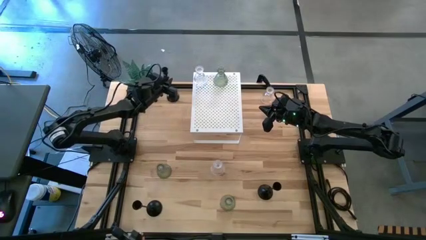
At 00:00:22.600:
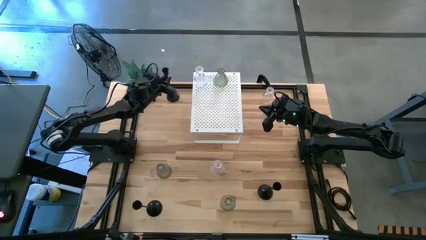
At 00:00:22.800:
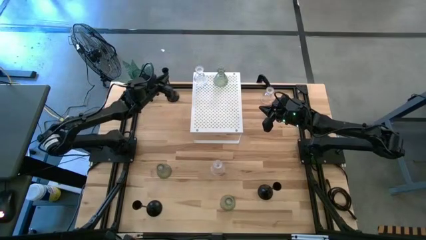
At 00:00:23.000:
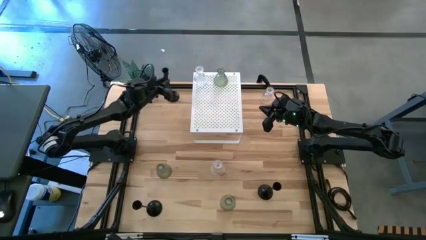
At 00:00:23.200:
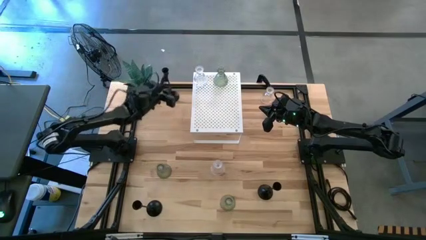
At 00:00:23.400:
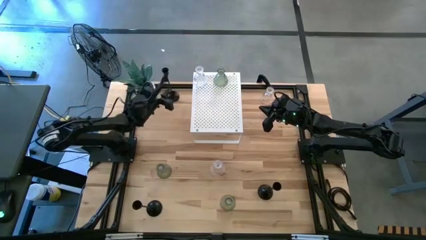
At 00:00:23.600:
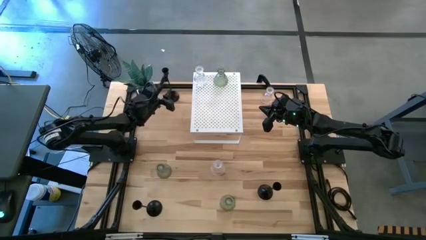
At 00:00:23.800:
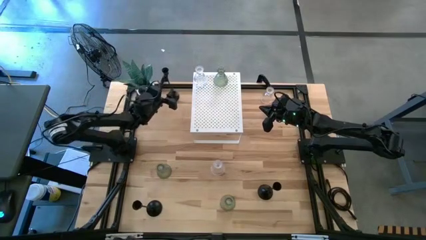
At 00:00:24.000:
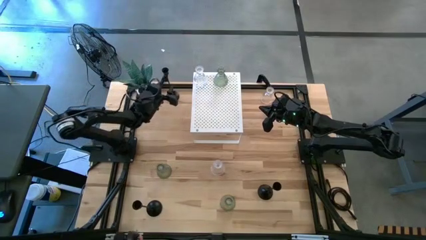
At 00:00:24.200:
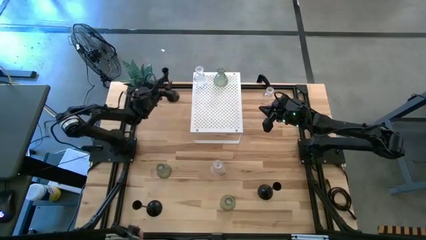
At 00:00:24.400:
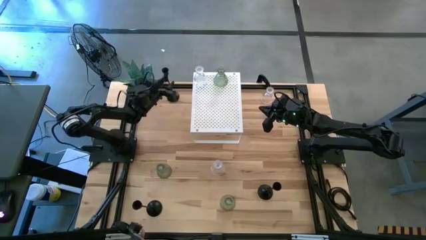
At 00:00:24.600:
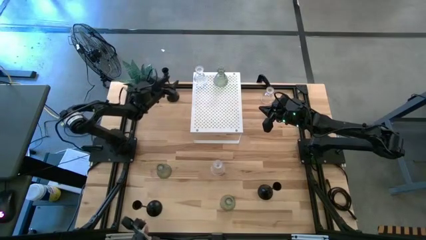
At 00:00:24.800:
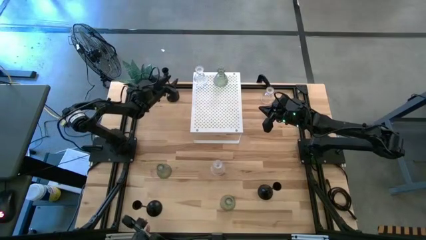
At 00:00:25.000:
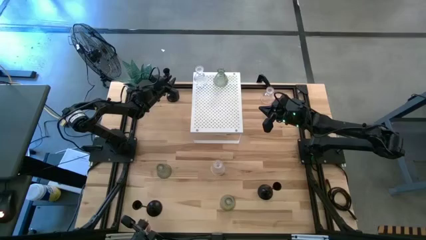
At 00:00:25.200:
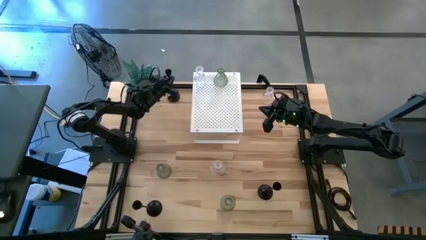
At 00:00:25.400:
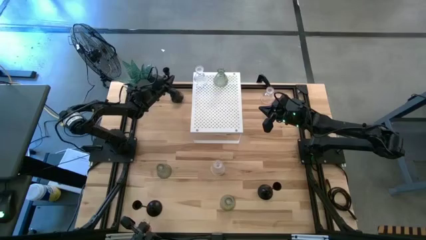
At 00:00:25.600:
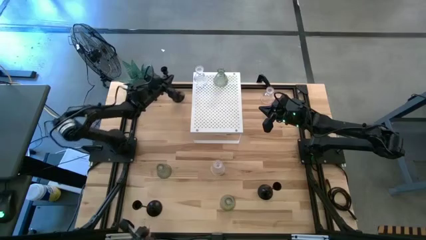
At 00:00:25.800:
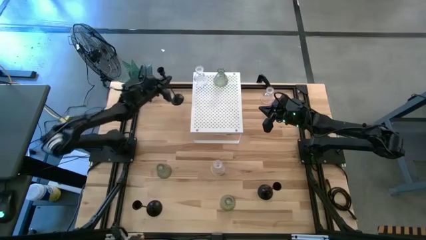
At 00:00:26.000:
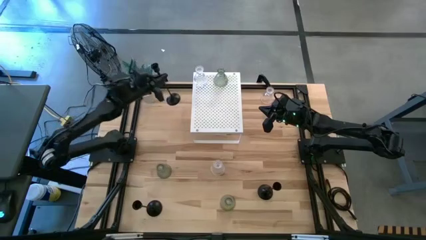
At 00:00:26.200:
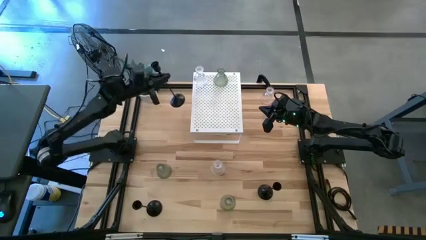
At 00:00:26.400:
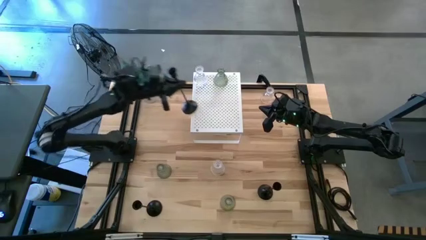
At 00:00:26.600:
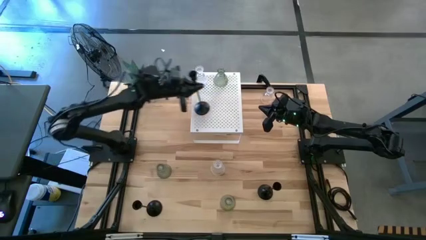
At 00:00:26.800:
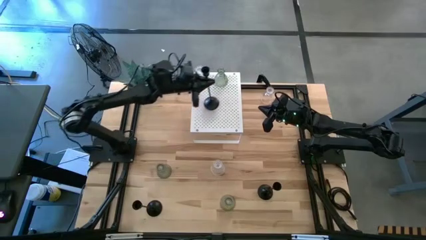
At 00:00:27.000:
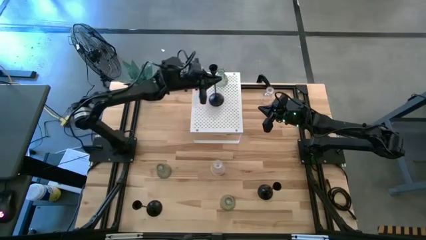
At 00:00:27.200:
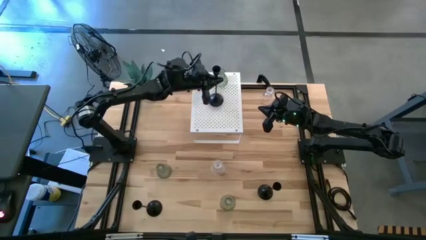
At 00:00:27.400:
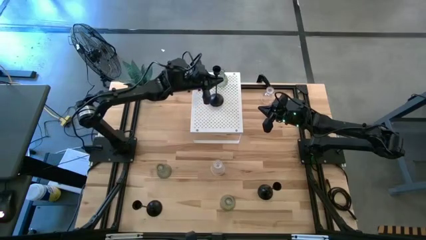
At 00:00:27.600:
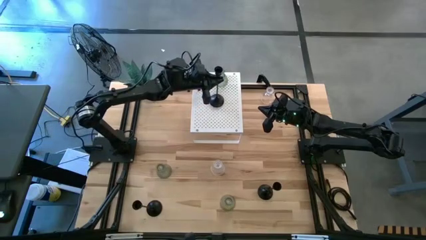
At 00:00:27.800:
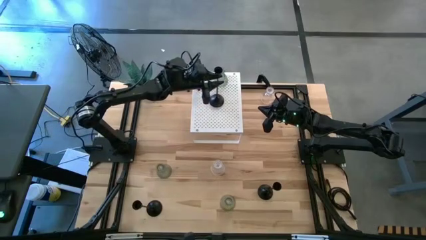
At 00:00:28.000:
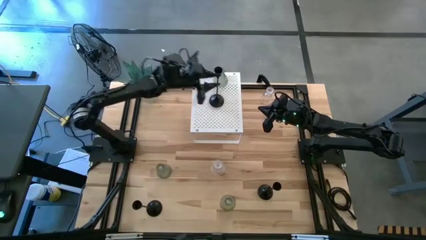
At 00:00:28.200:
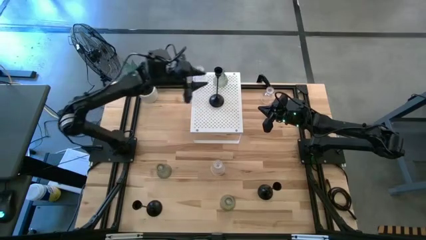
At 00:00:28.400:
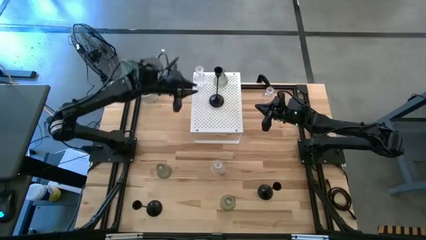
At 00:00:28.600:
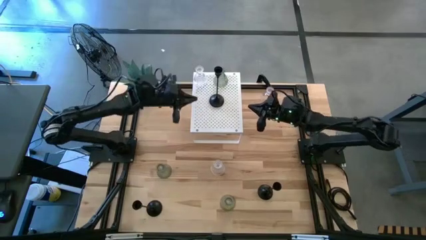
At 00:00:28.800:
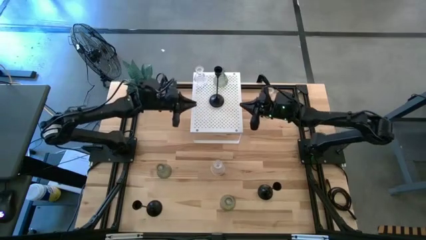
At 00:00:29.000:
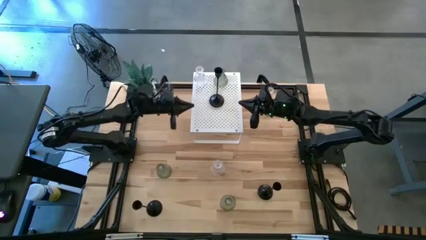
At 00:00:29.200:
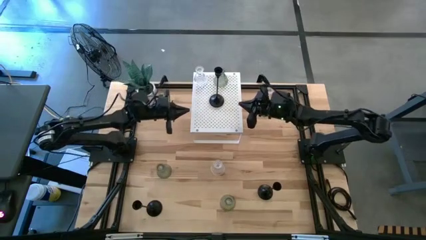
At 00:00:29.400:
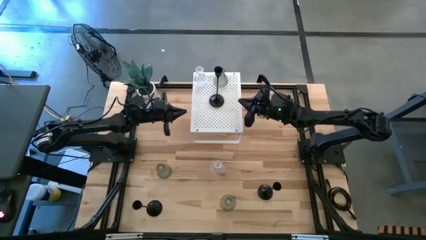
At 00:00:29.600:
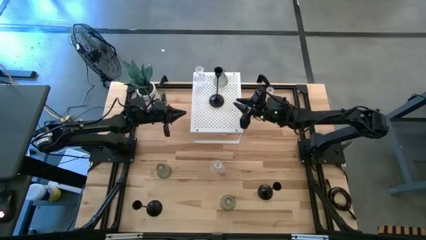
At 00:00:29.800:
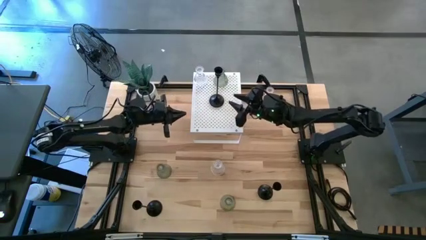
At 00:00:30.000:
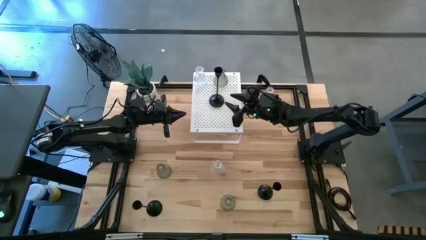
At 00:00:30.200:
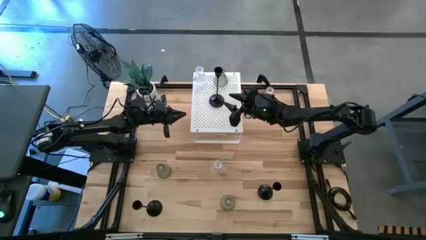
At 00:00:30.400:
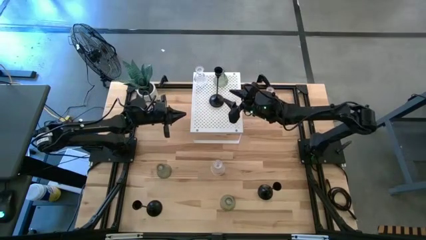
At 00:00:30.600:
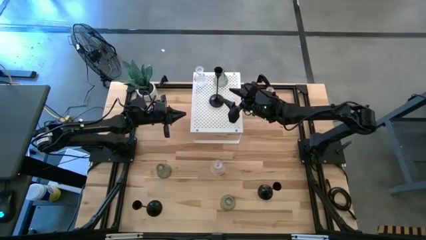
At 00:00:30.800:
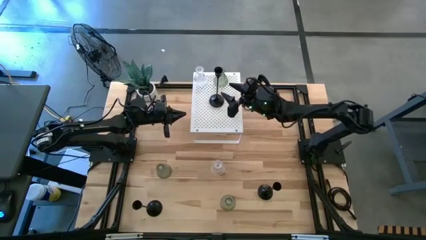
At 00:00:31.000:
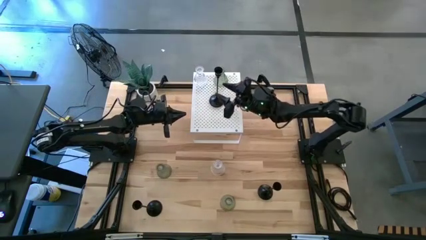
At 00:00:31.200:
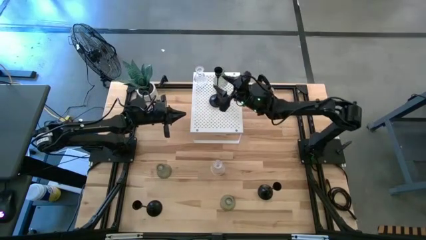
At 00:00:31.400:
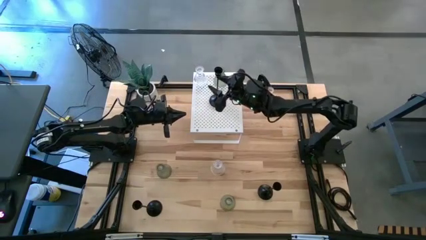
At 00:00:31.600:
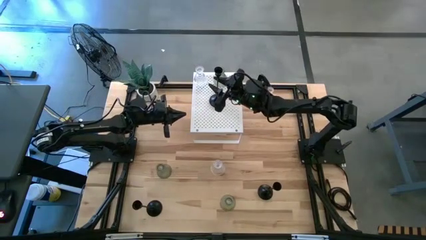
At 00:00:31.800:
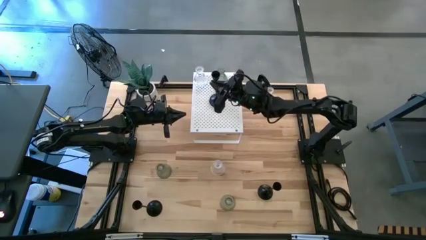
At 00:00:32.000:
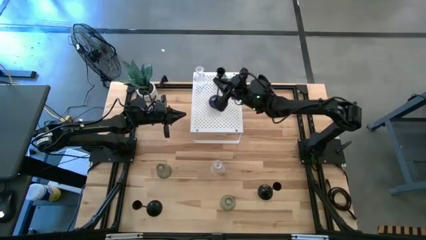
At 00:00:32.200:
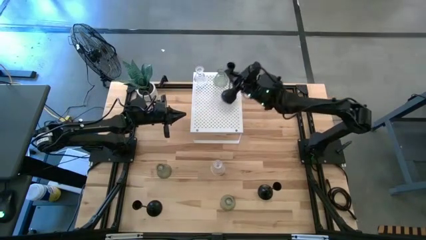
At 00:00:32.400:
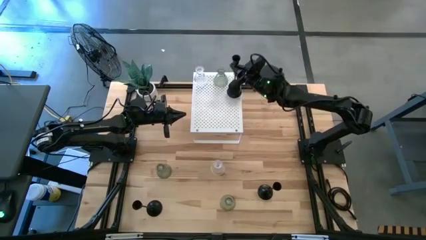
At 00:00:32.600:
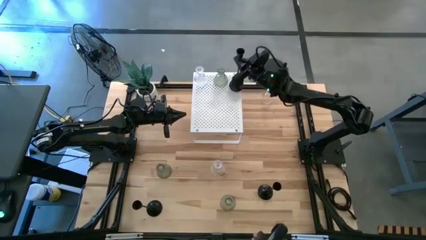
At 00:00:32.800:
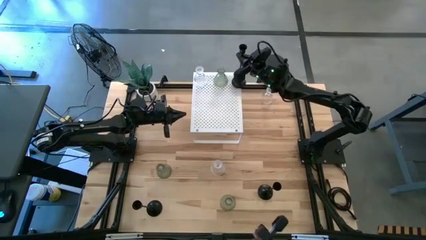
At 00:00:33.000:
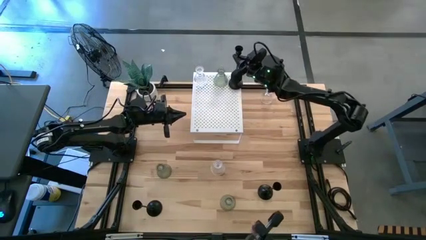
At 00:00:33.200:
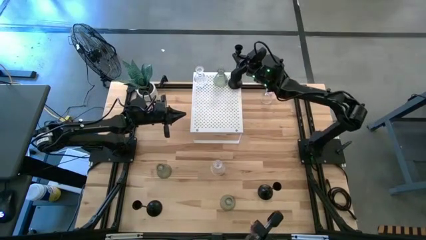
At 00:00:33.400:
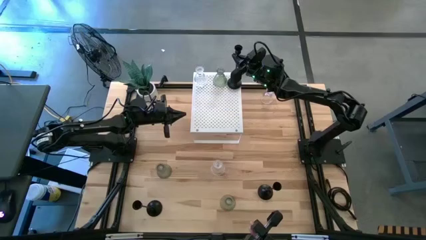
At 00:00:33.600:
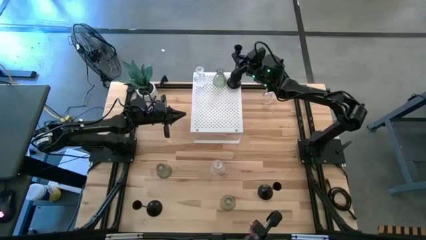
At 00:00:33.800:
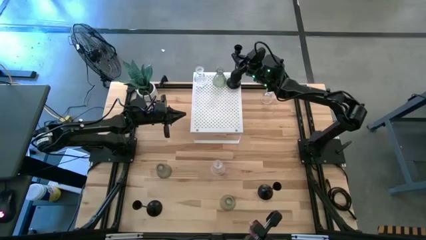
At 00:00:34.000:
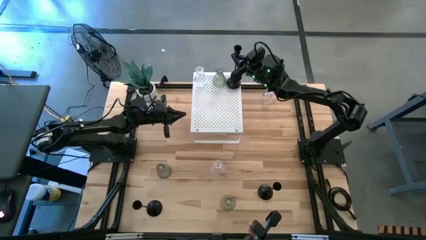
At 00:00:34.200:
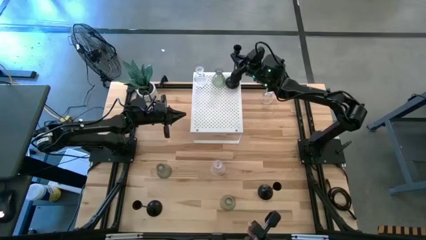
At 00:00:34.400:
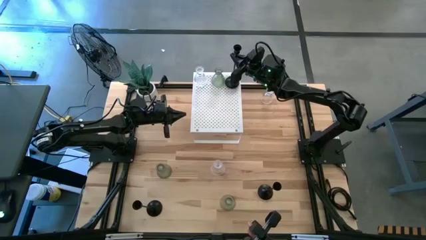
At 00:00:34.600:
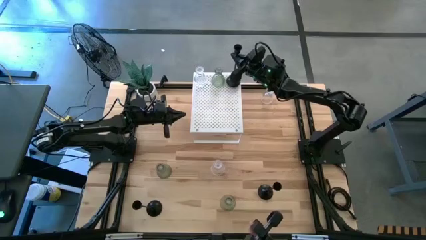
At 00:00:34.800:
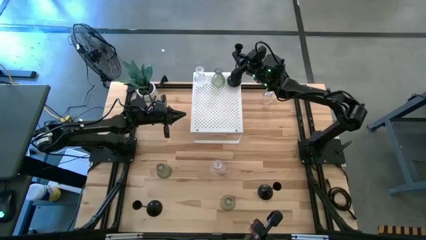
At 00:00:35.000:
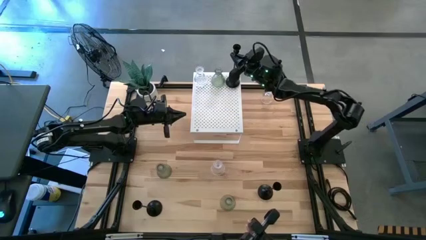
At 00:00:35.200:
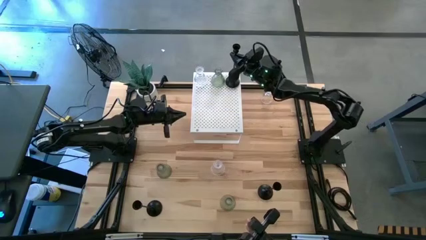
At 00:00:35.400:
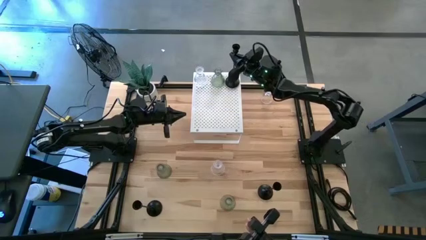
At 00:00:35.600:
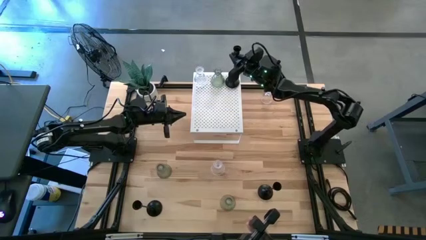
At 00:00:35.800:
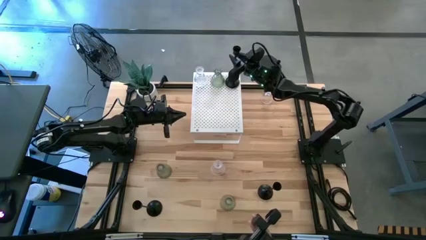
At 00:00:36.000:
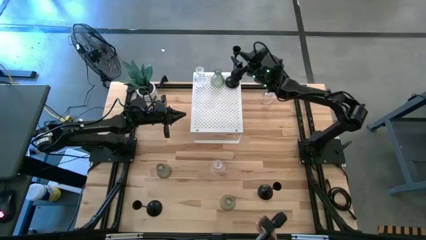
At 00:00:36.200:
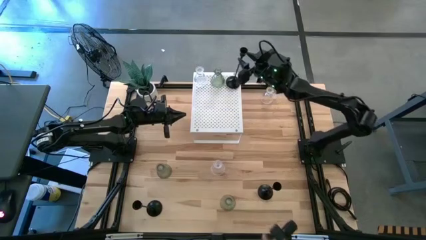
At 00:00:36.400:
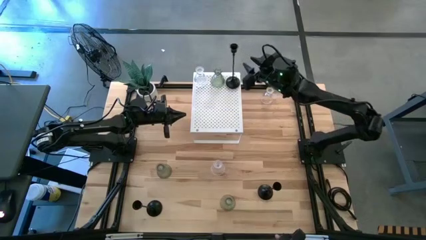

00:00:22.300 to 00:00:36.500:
Task: Pick & Place candle stick holders
Put the top left black candle holder on the shelf
